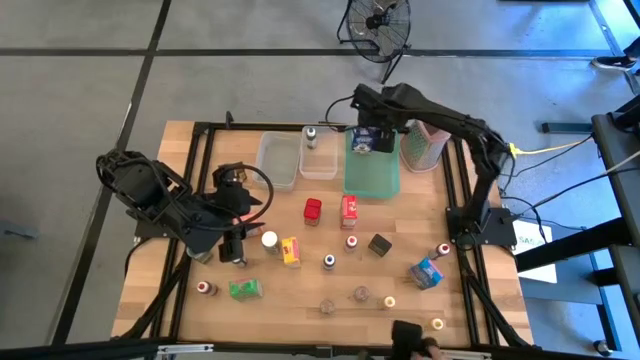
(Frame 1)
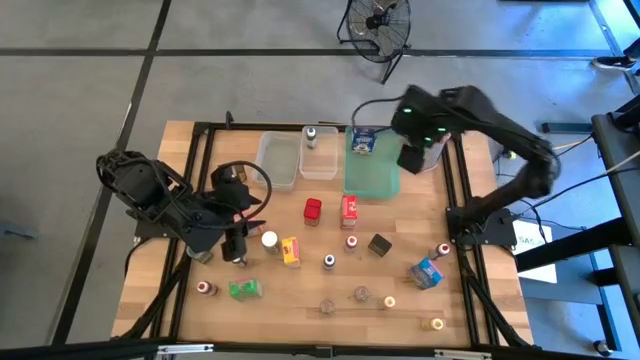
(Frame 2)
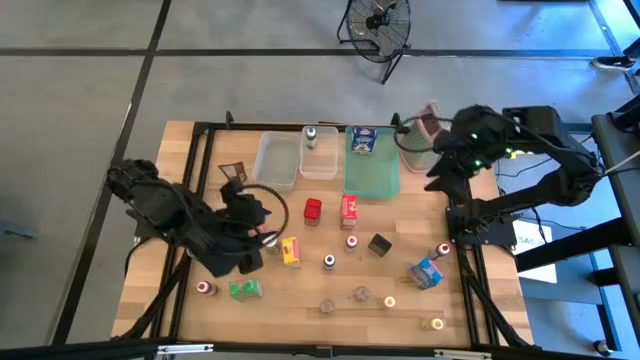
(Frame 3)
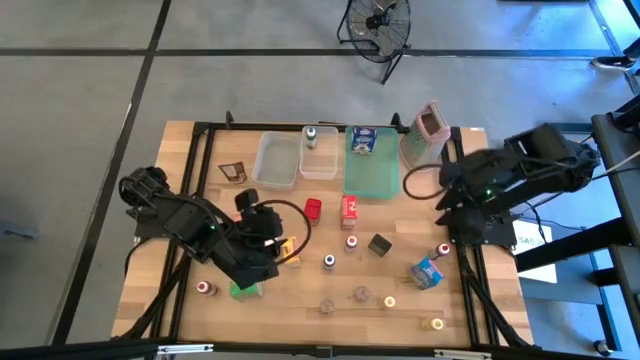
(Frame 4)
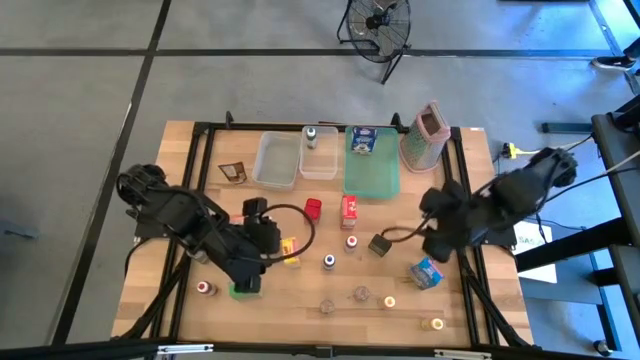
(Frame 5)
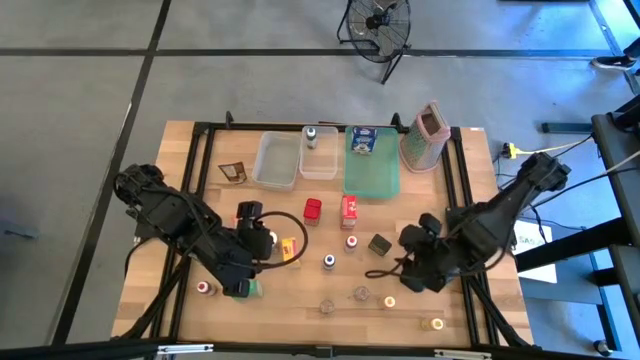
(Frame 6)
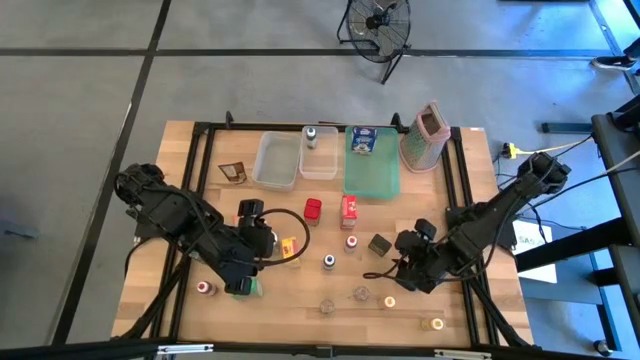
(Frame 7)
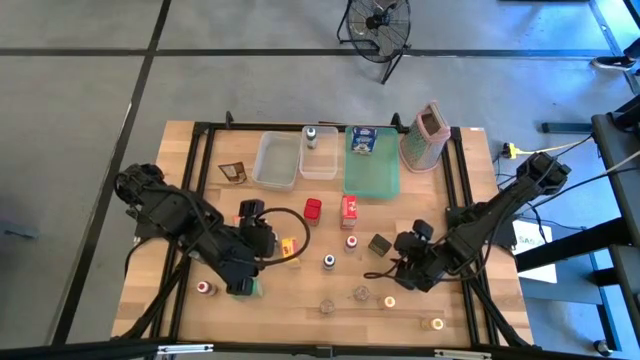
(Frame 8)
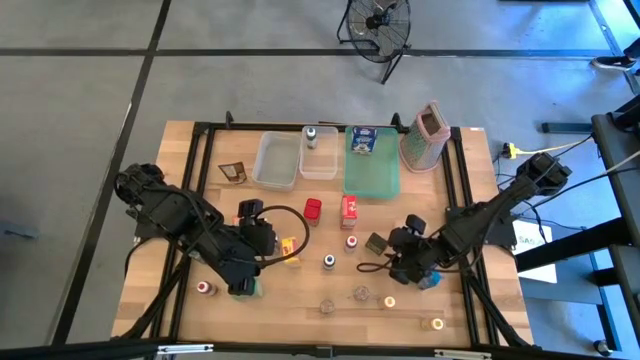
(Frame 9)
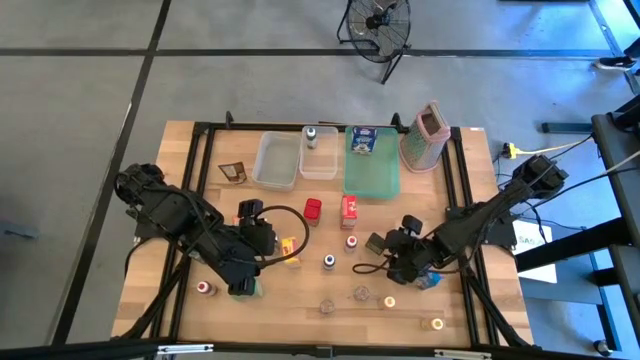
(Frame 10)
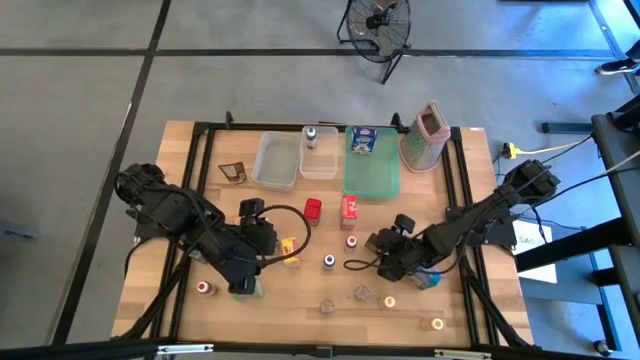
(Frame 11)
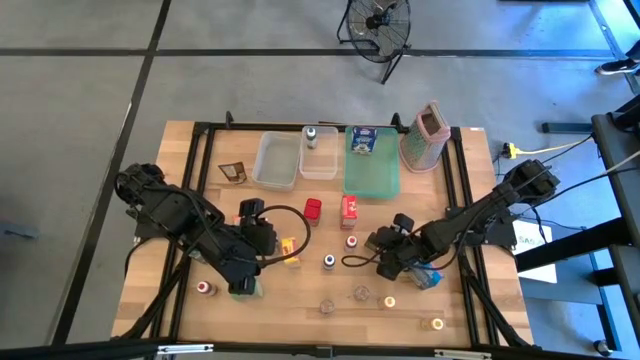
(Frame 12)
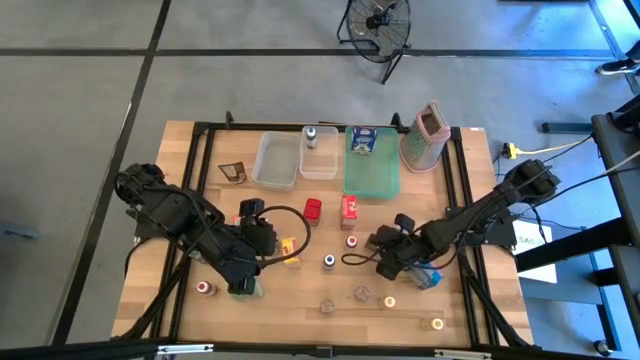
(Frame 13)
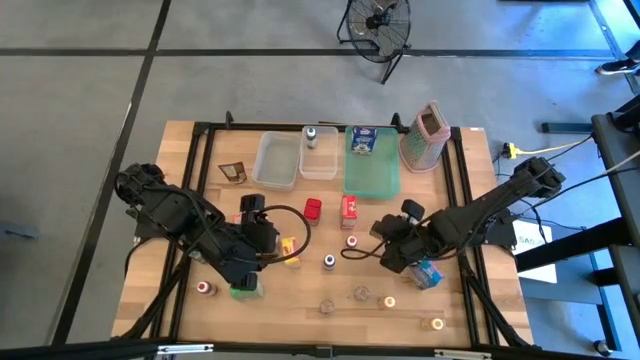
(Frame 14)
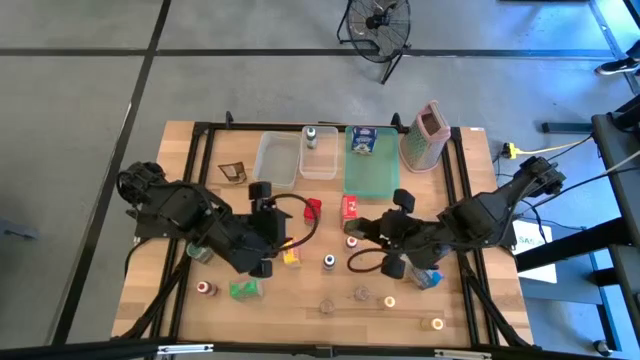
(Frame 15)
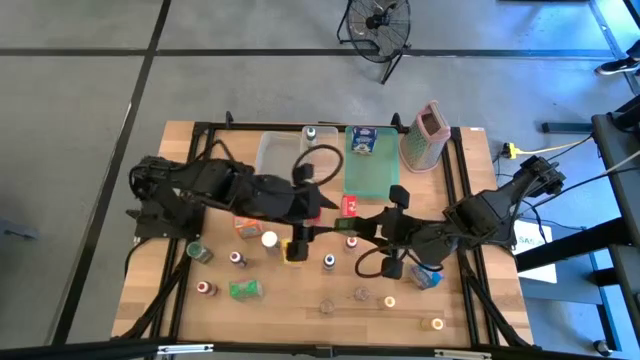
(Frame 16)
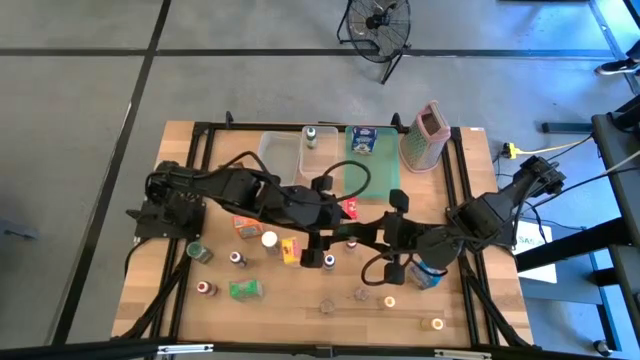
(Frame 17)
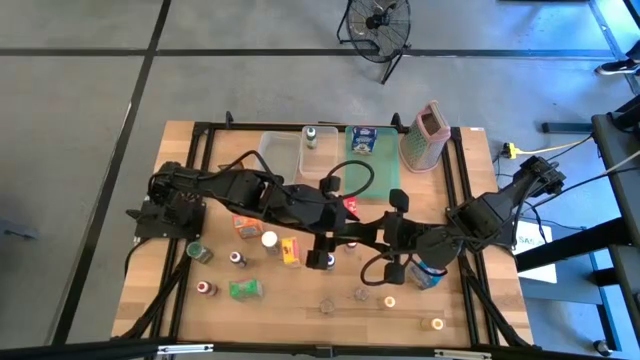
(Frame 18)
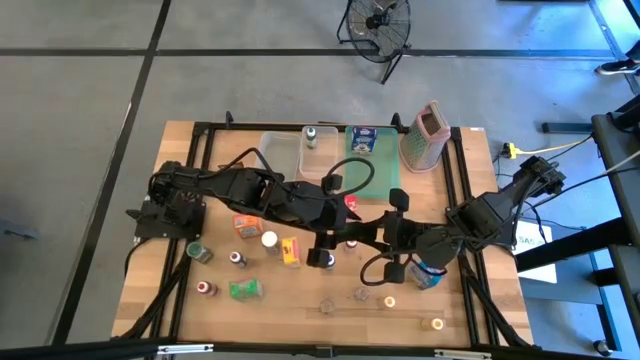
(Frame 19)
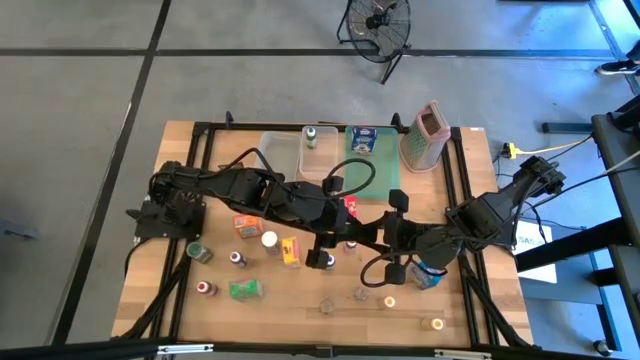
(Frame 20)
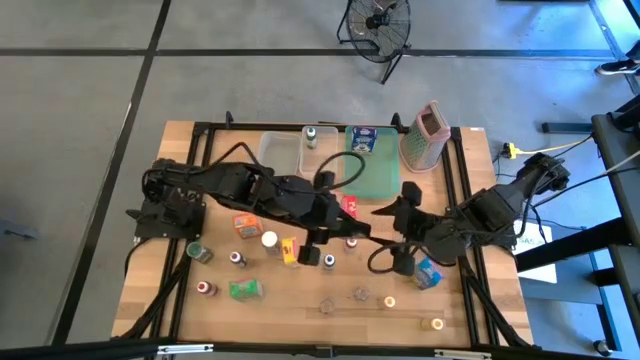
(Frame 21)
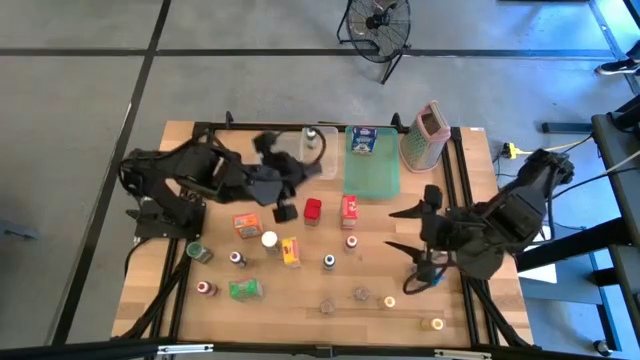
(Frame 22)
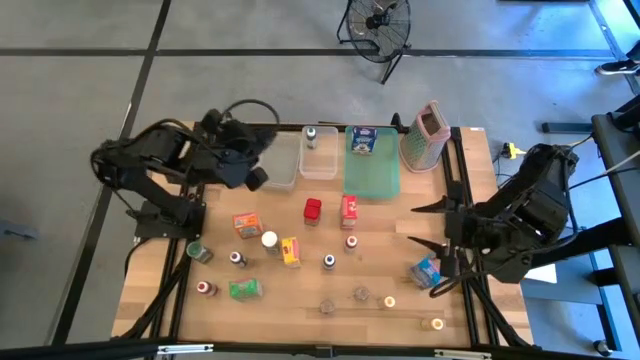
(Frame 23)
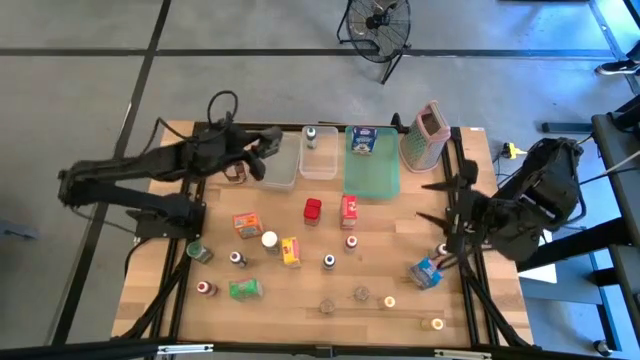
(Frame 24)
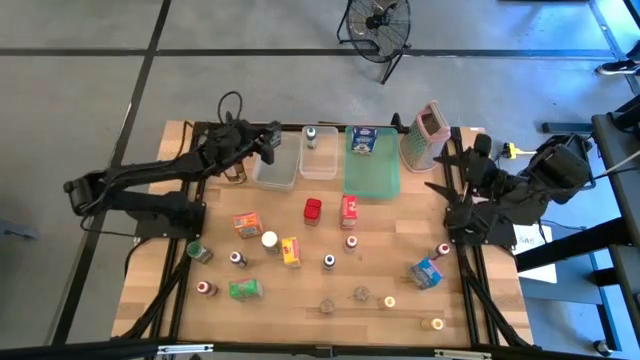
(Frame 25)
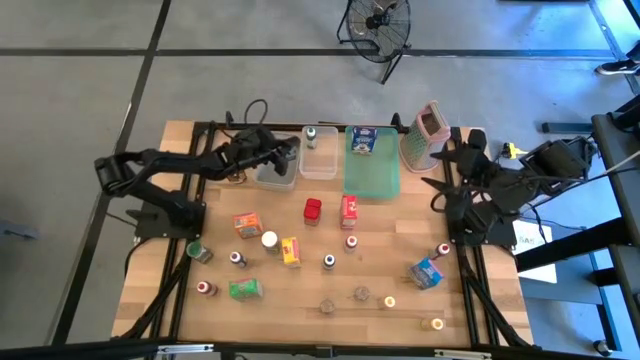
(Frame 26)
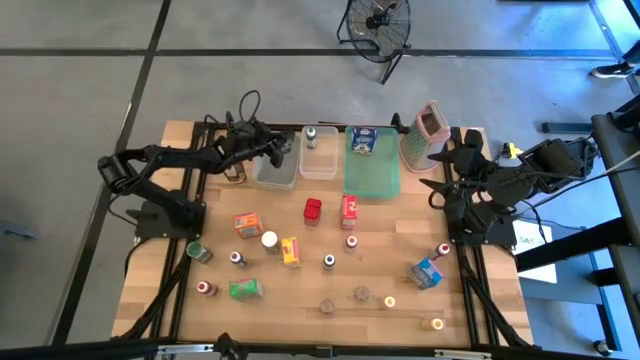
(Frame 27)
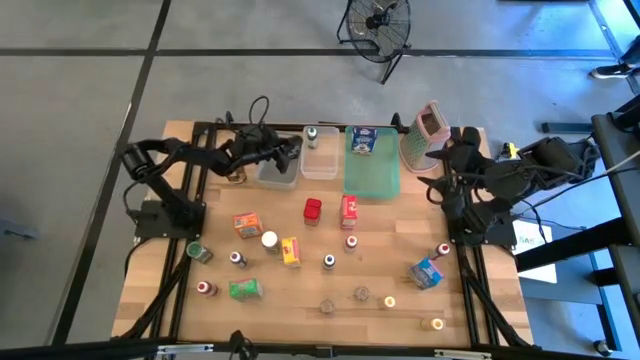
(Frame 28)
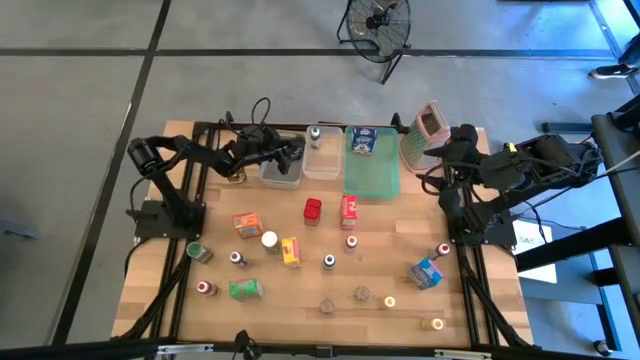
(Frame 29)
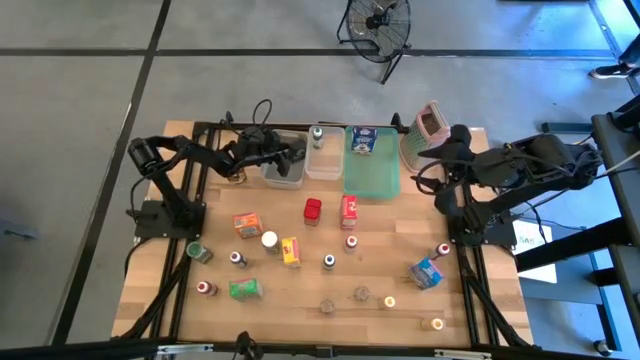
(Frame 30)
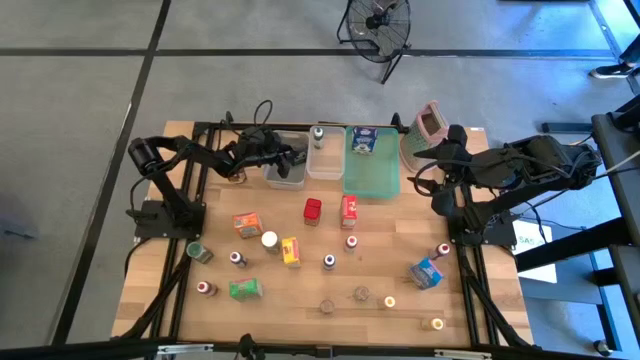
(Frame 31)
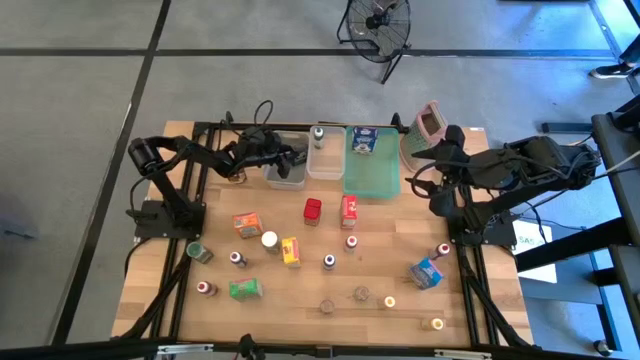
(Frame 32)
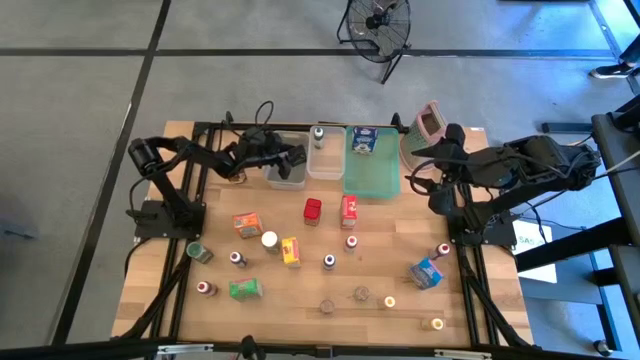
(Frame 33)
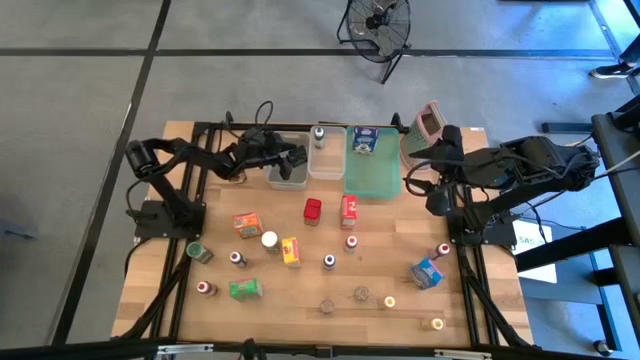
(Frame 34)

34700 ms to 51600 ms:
Task: Pick & Place Kitchen Items
Put the black seasoning can into the gray bin

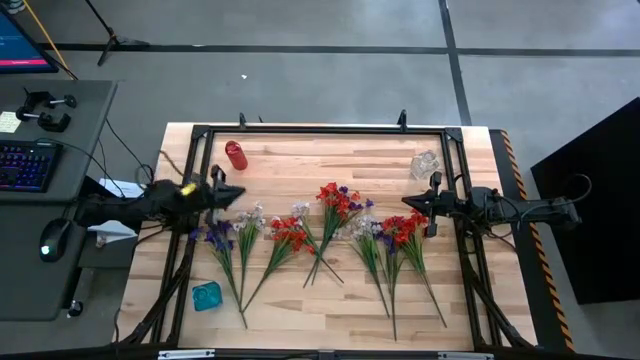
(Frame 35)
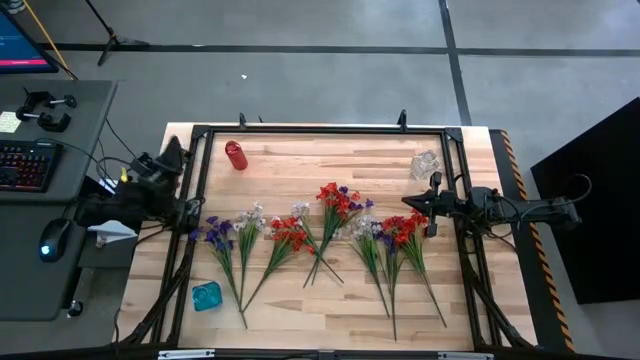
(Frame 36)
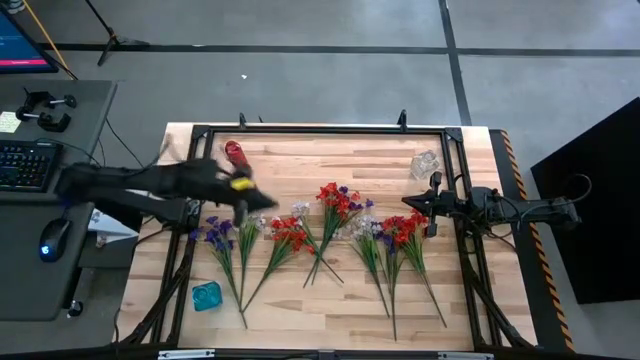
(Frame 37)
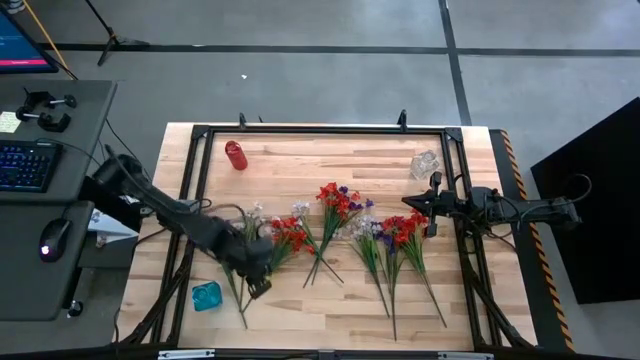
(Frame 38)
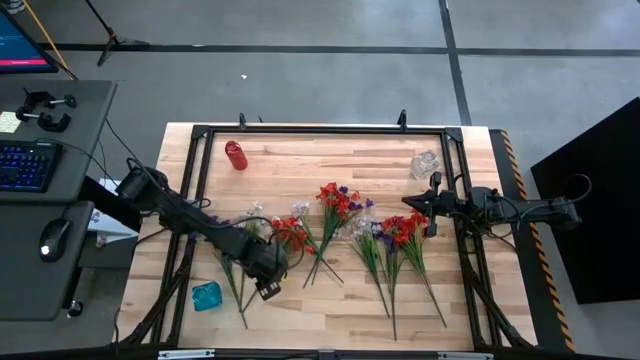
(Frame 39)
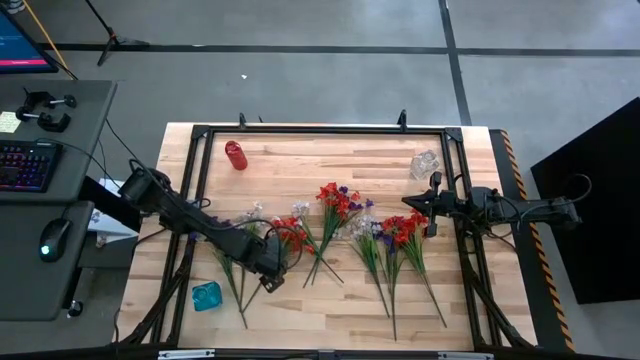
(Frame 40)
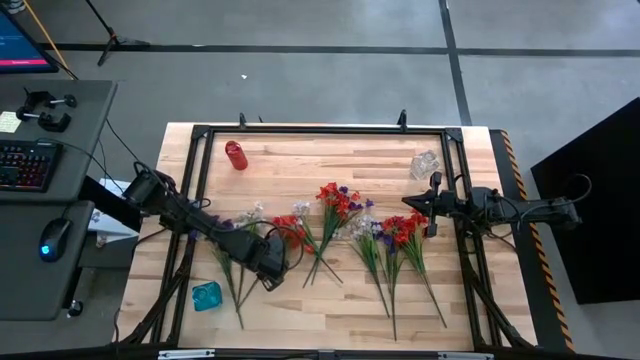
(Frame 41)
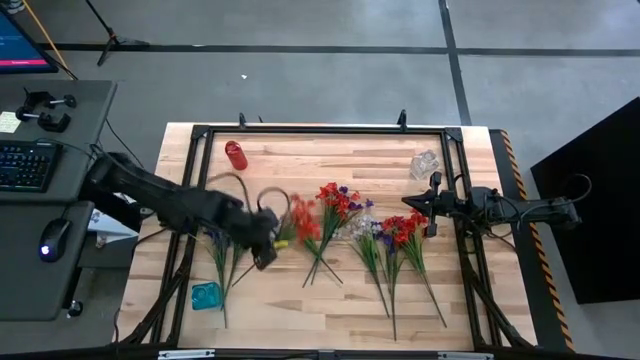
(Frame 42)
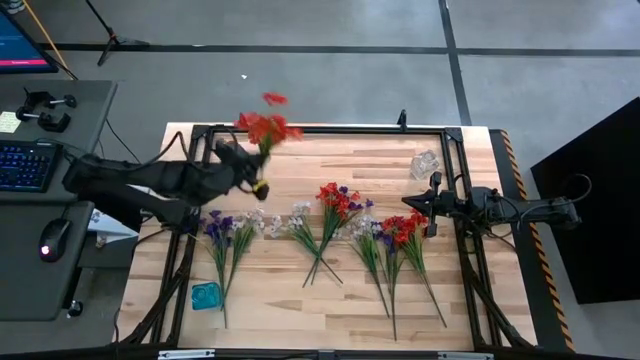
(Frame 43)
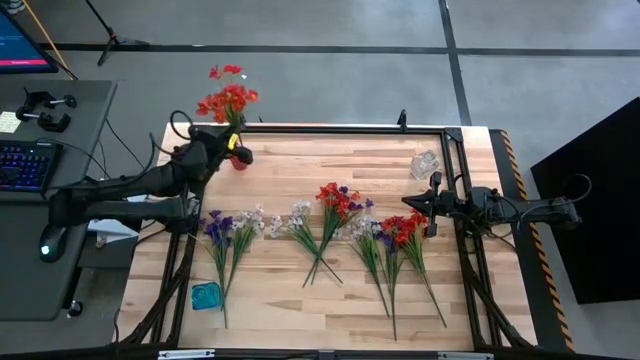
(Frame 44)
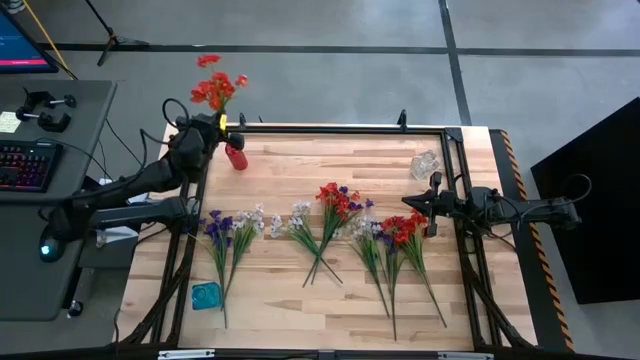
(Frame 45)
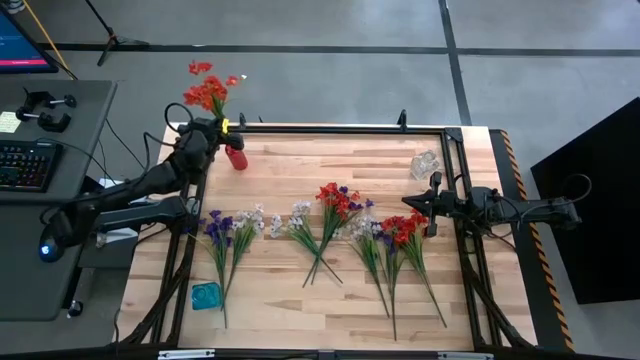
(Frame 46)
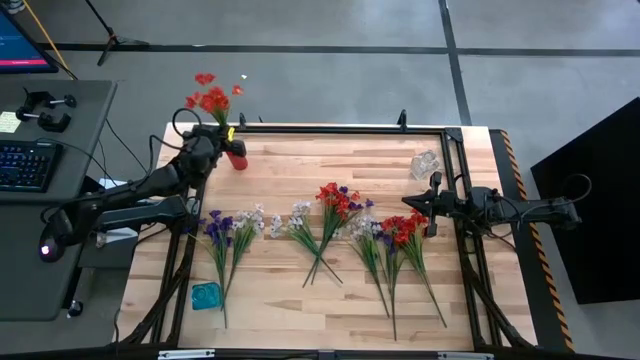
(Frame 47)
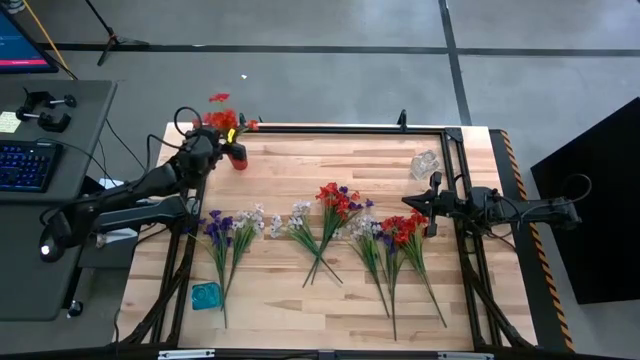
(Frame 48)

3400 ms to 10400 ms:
Task: Sort flowers into vase by color
Put the left red flowers into the red vase
